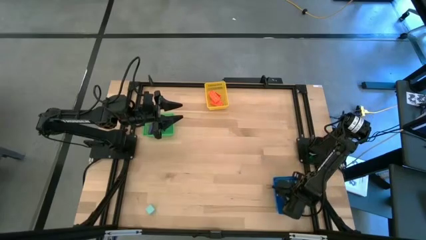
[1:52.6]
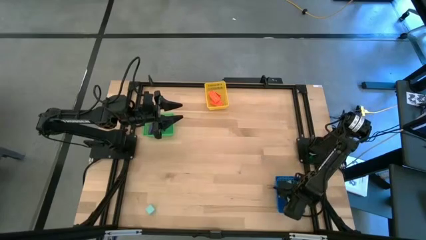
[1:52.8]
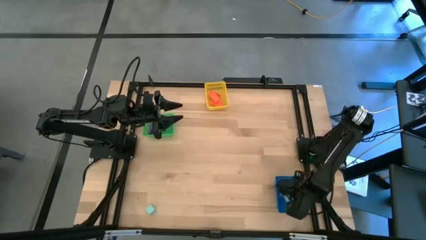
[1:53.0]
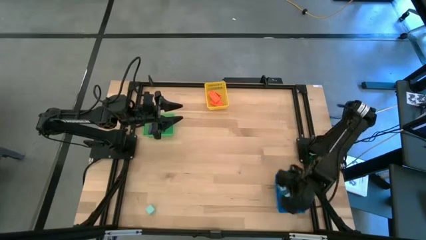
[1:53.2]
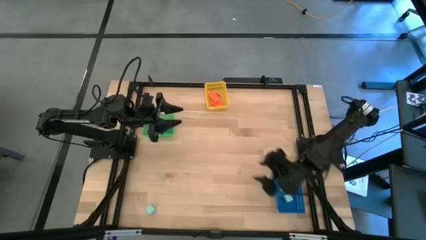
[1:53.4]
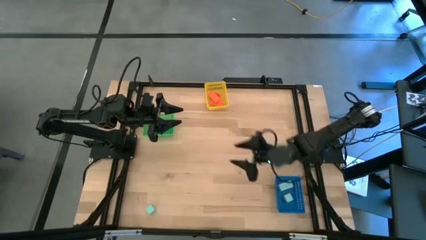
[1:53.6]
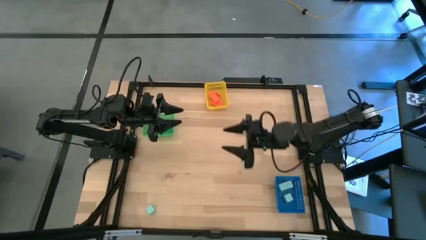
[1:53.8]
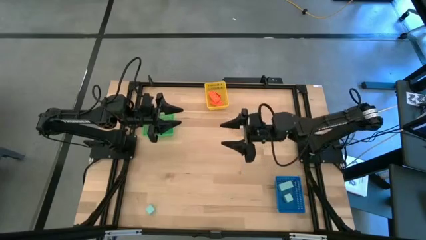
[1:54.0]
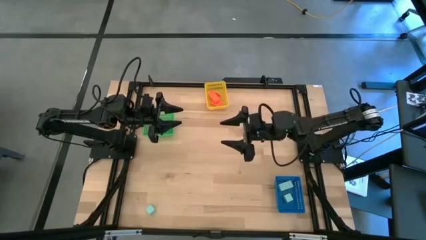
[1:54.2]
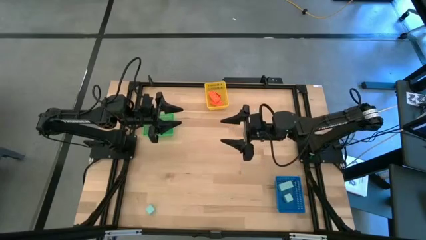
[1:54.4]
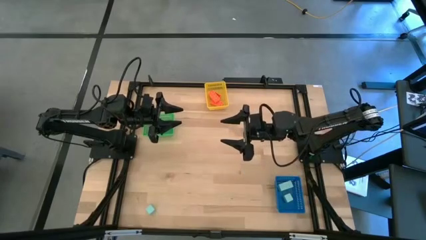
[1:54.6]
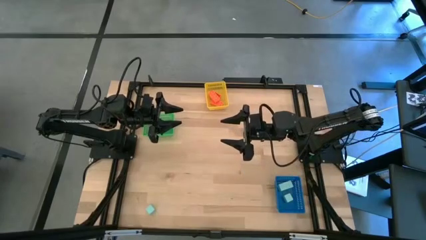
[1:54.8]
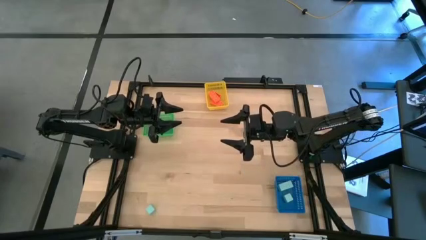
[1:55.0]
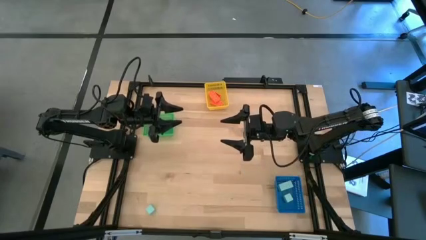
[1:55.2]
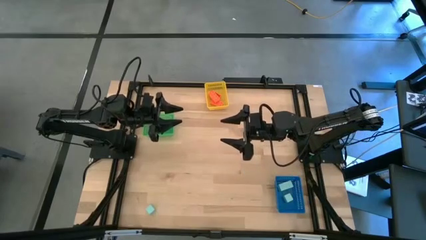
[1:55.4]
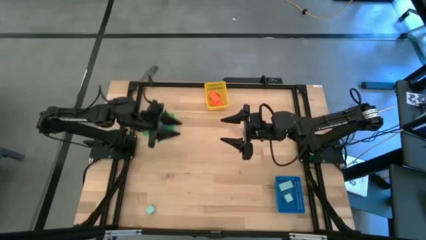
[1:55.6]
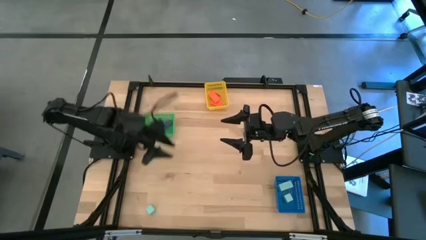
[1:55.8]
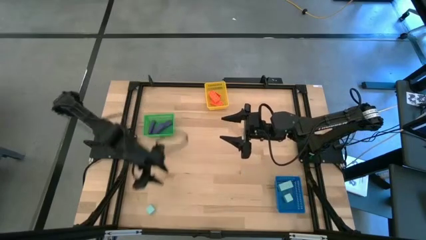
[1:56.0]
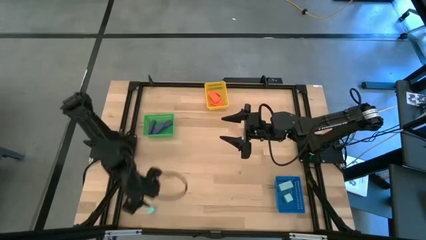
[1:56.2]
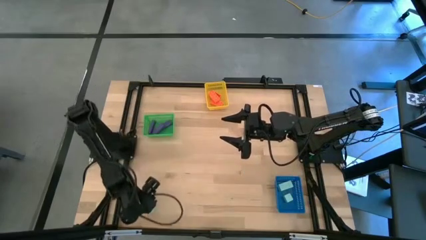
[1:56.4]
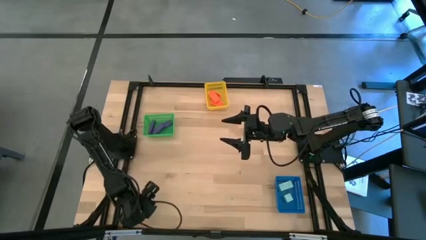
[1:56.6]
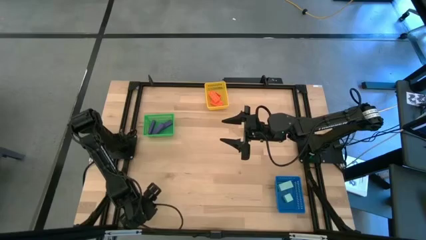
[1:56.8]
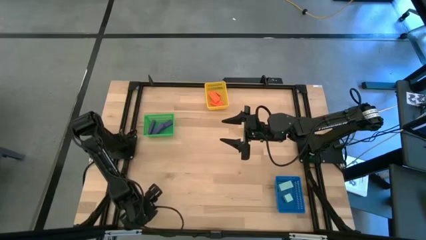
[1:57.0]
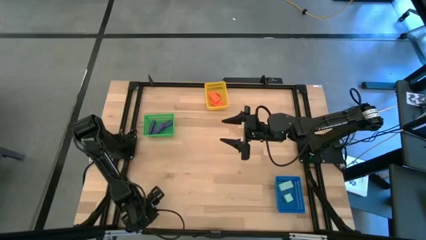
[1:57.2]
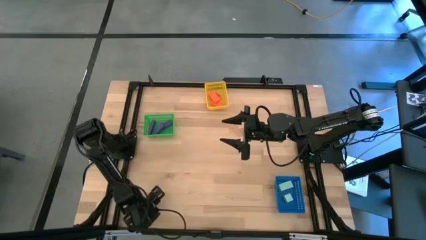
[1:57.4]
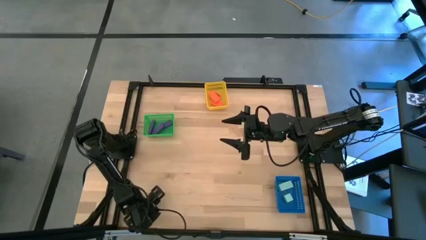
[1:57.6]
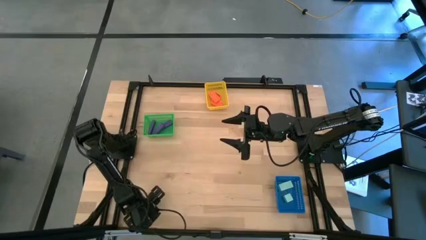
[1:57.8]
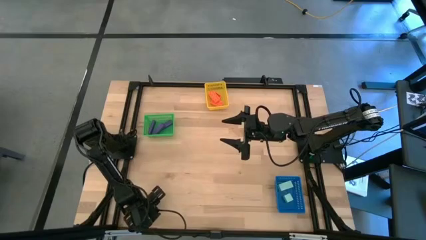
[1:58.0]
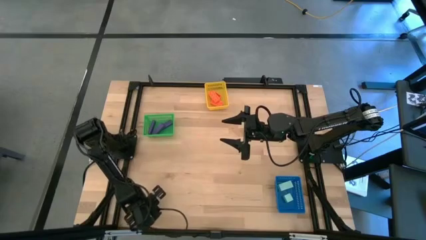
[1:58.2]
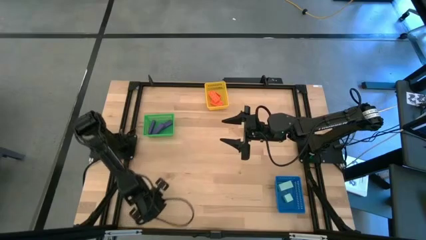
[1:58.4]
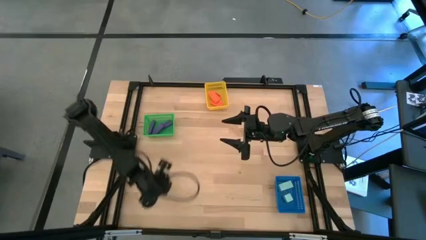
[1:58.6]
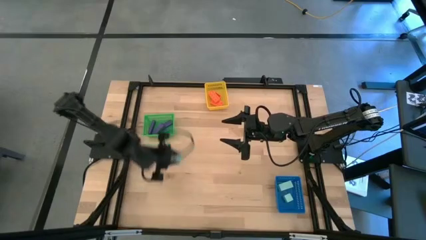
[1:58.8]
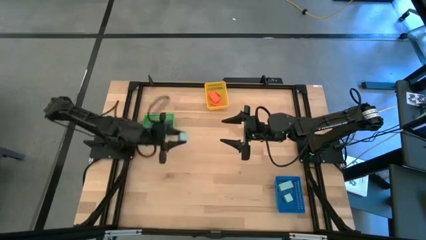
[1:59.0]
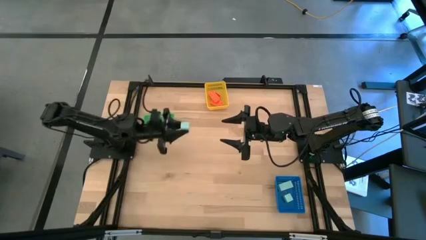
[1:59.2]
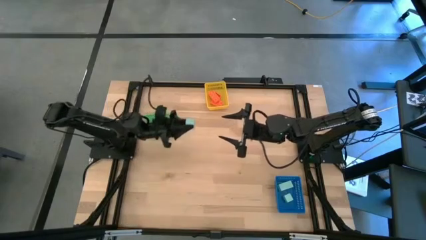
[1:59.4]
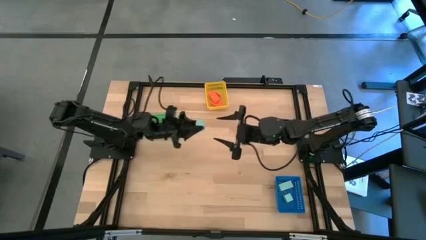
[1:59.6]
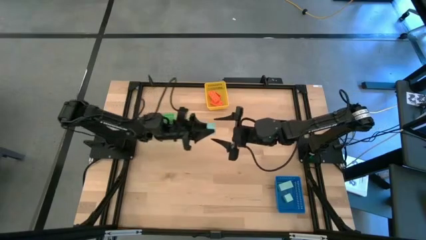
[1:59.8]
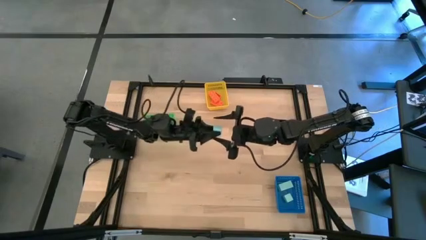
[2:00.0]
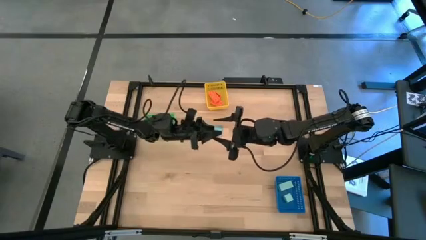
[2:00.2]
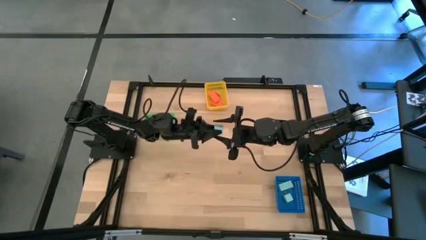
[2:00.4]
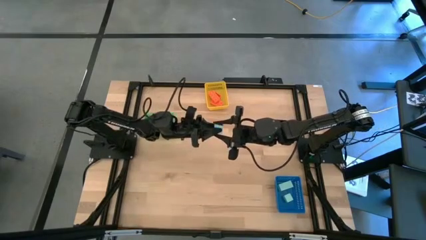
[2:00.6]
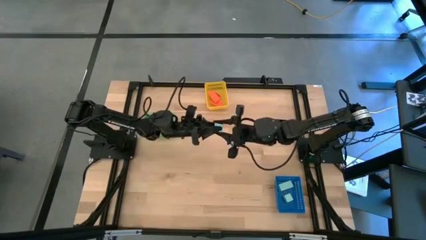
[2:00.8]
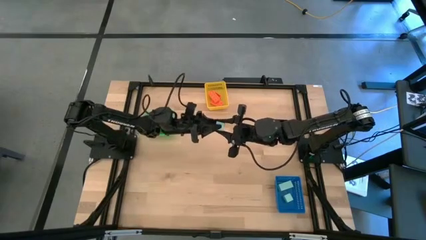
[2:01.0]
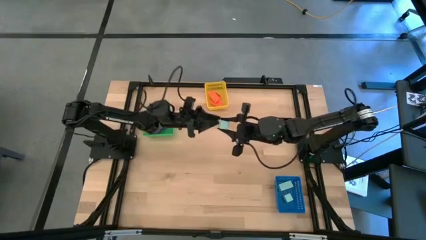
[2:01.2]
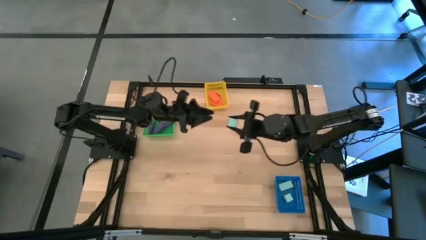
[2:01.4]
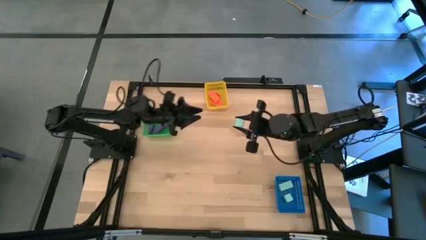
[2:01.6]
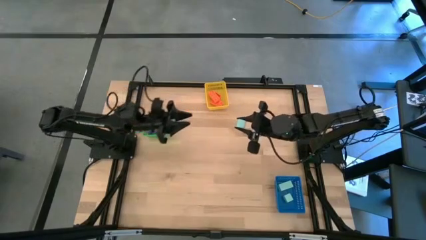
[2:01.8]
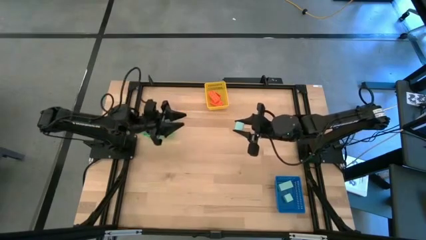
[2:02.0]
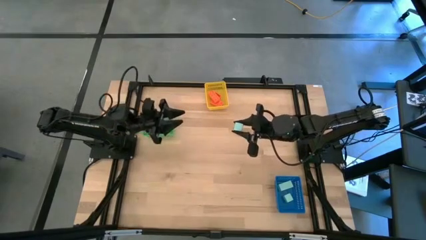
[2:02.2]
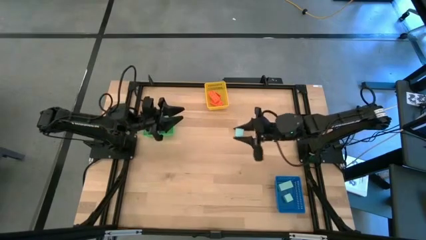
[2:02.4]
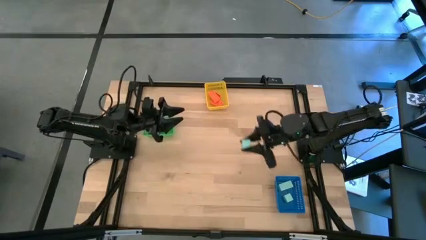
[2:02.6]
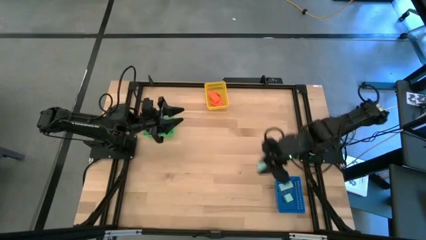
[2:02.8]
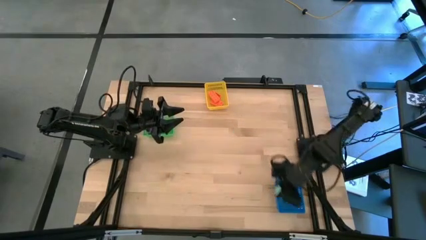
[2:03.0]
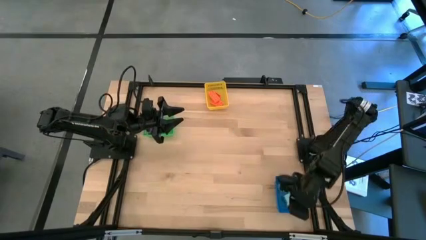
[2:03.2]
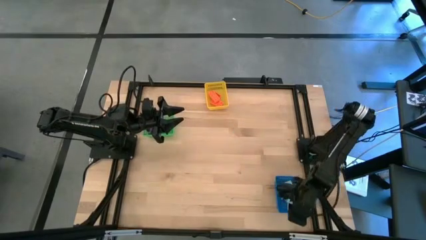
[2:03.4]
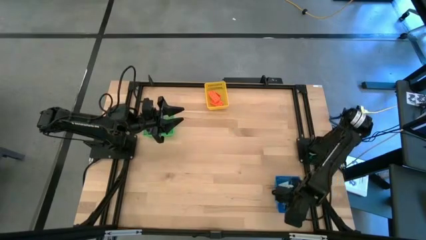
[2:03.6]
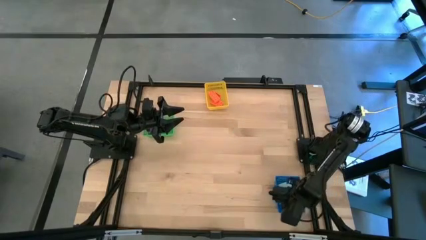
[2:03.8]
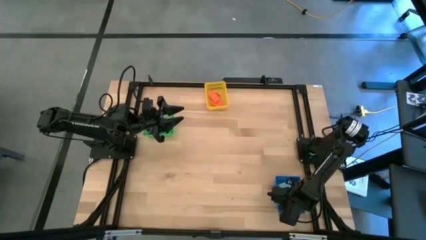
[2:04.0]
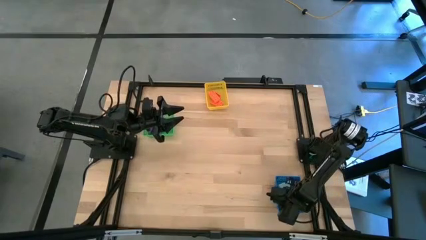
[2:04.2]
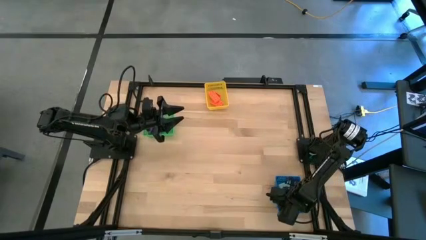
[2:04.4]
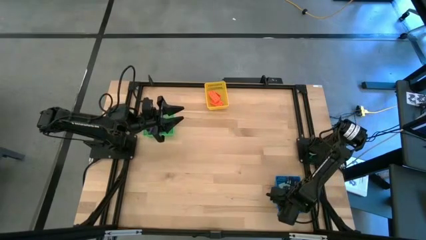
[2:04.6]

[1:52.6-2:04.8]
Task: Sort & place blocks by color
Put the light blue block into the blue bin

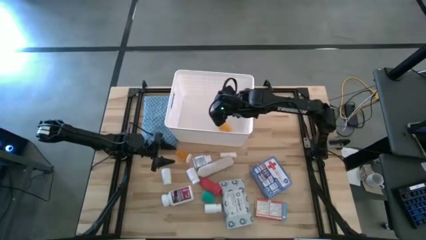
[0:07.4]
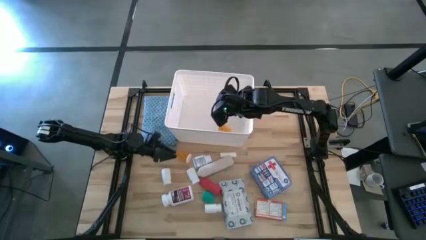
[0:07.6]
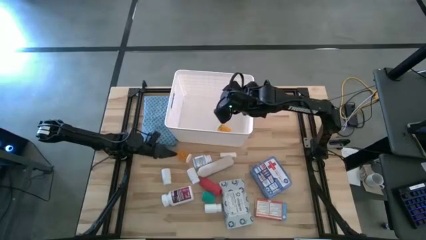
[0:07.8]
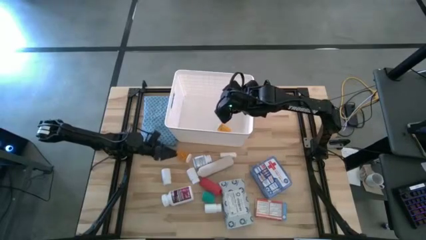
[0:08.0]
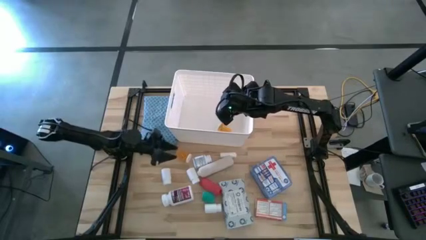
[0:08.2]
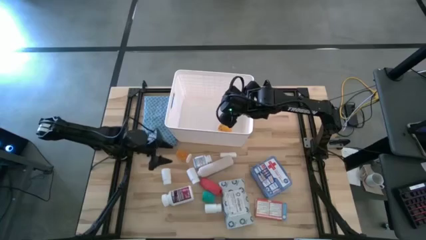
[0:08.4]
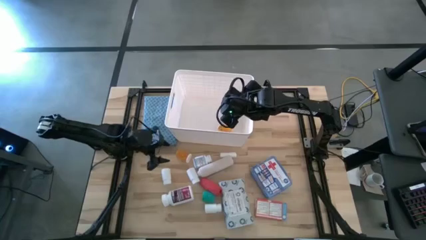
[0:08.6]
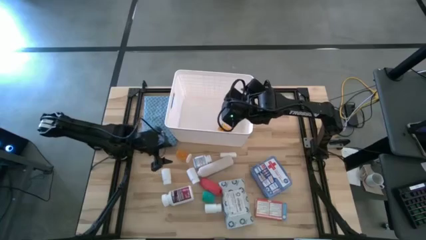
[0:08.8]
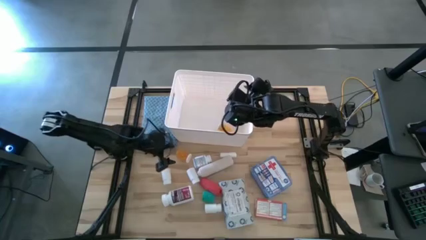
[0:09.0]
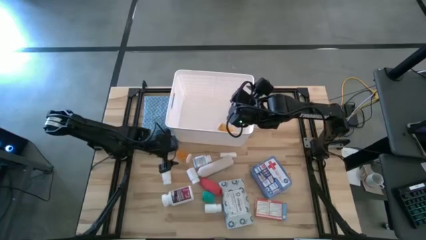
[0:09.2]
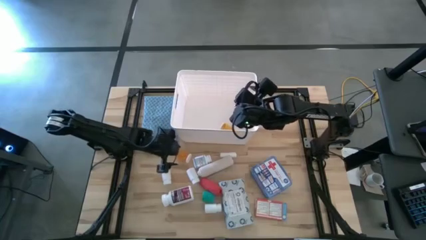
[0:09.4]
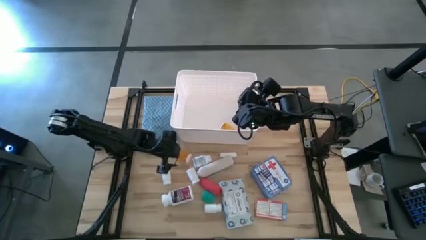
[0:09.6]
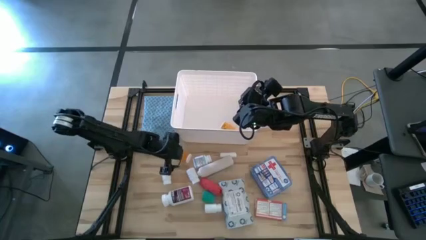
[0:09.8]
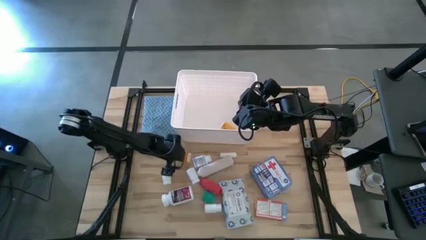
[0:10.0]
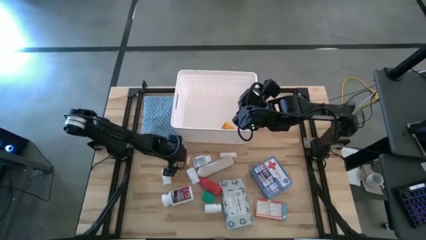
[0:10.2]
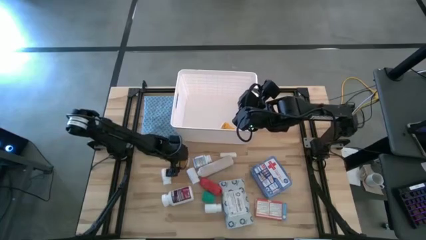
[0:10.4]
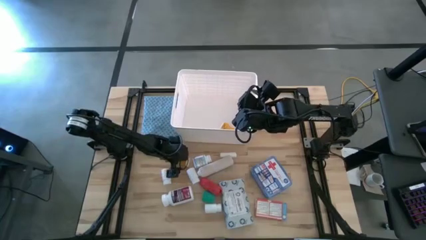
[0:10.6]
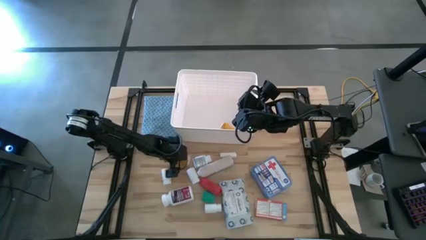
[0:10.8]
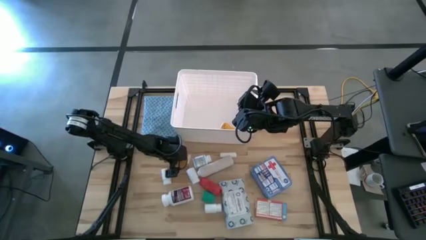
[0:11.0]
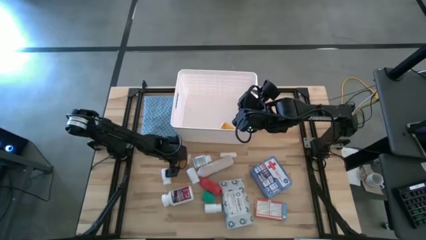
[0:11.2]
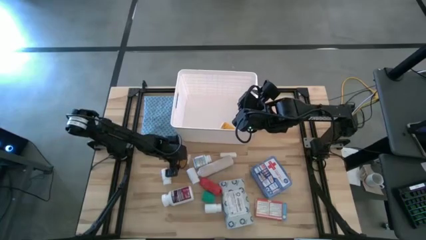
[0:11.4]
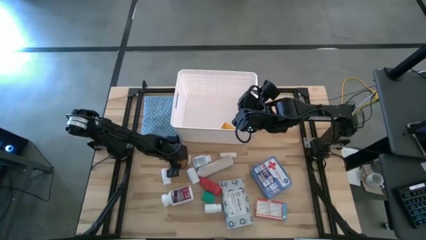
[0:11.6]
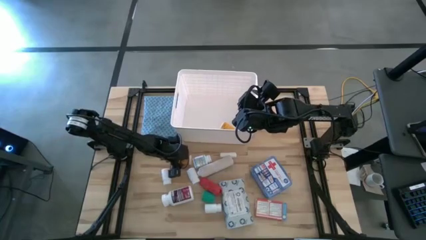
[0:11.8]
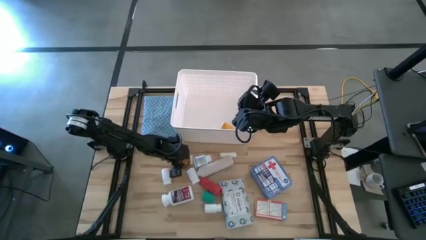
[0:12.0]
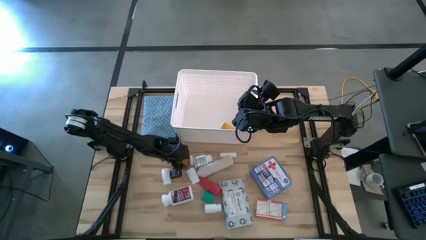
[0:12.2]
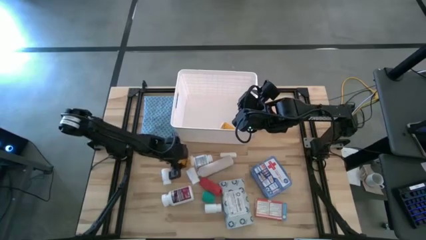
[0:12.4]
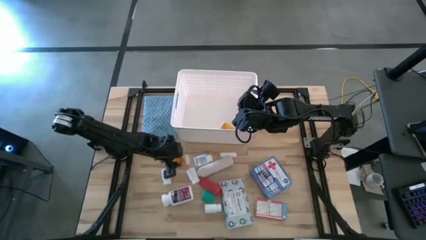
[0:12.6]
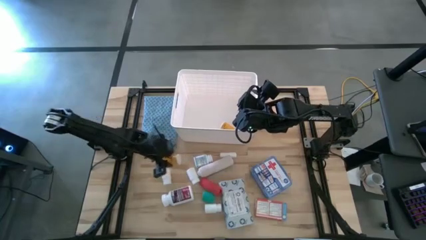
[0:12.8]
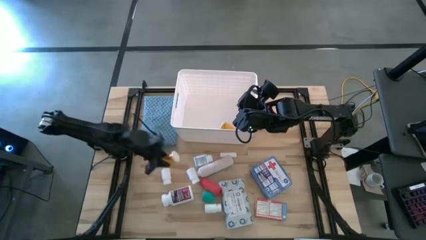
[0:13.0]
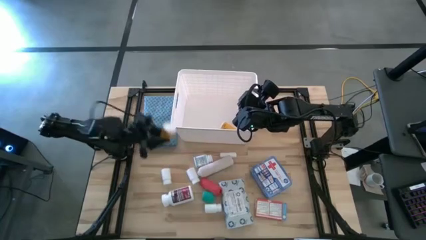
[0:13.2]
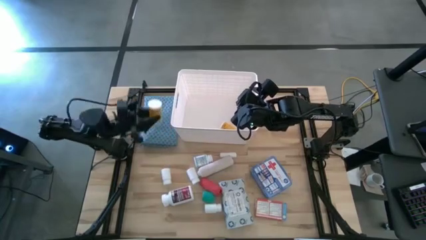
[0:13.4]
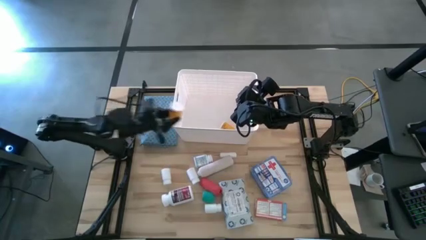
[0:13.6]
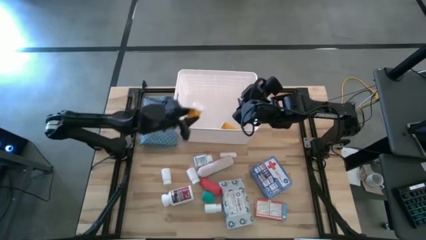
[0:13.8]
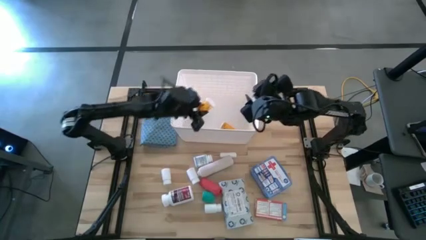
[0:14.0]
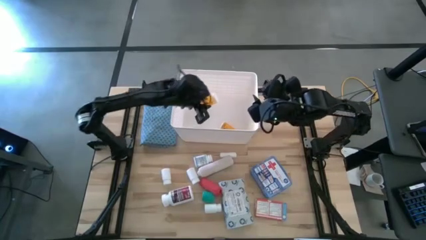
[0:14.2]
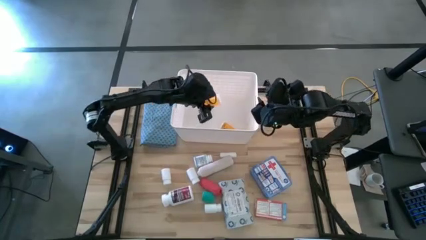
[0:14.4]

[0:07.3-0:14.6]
Task: Pick & place medical supplies in basket/bin
Put the orange pill bottle into the white container
